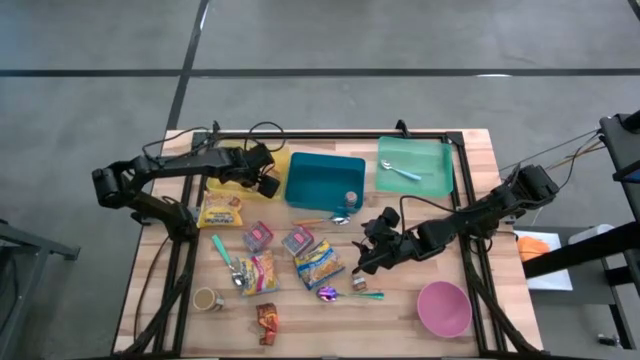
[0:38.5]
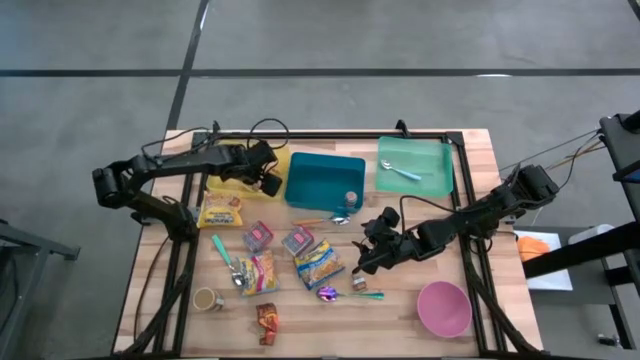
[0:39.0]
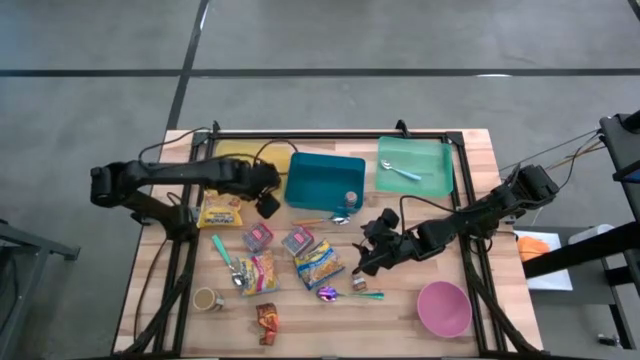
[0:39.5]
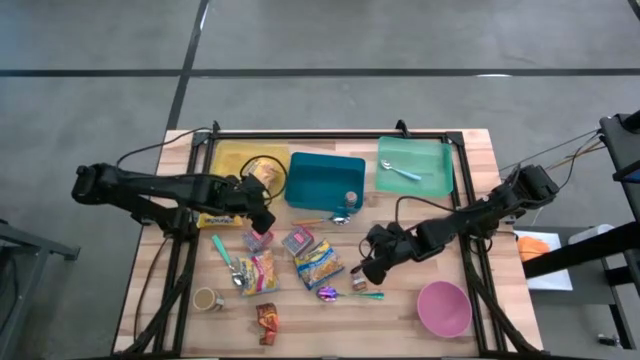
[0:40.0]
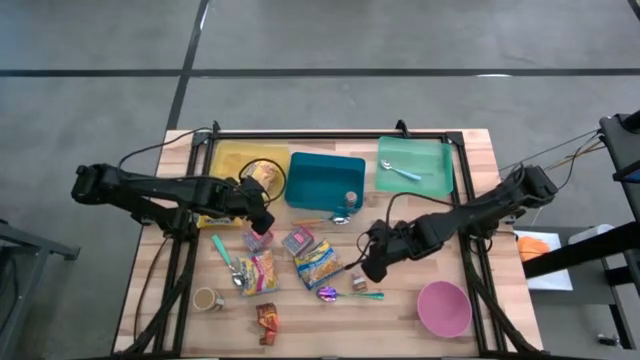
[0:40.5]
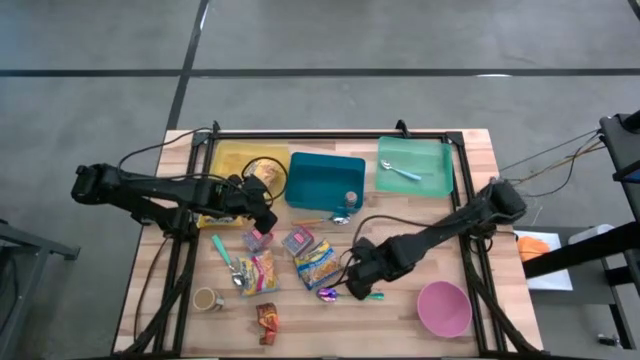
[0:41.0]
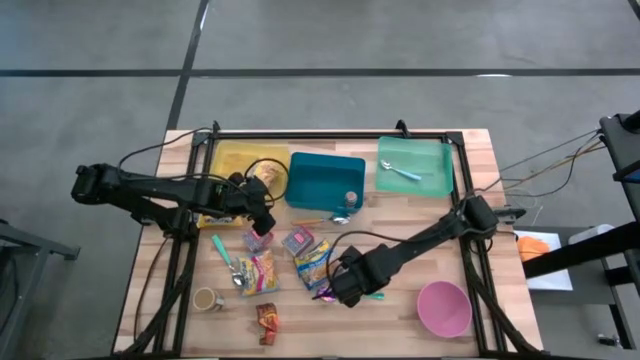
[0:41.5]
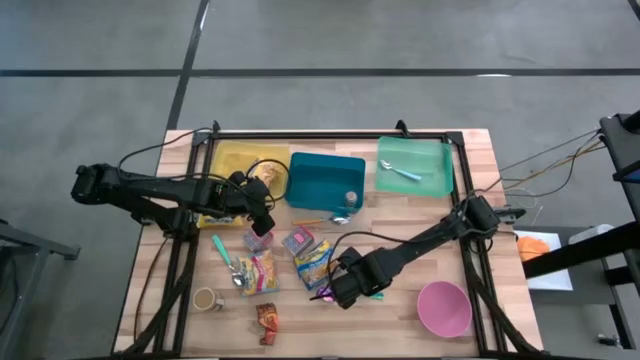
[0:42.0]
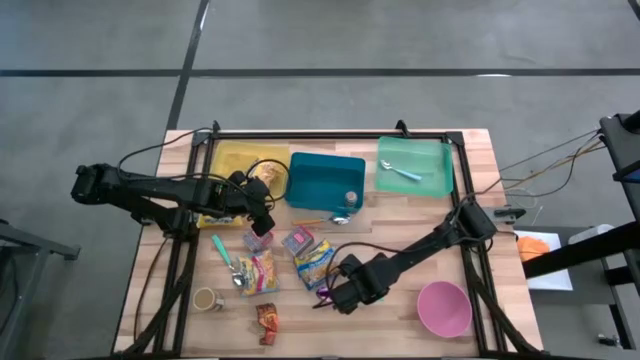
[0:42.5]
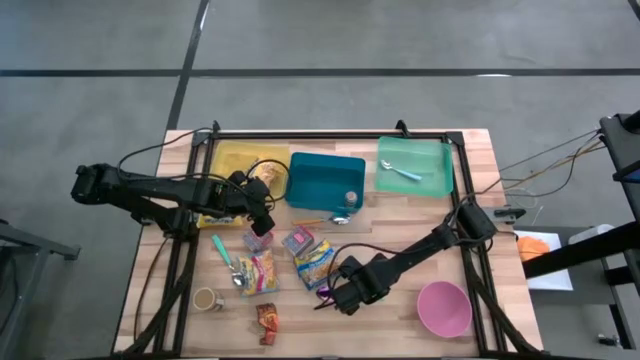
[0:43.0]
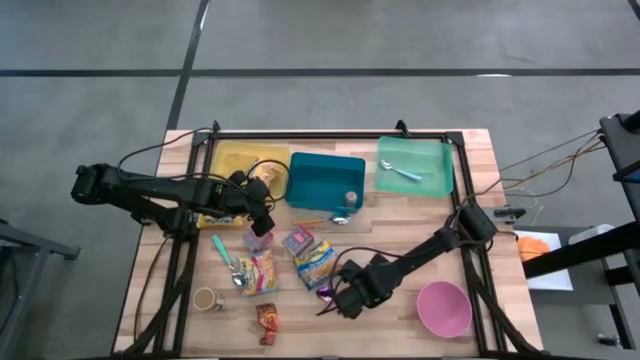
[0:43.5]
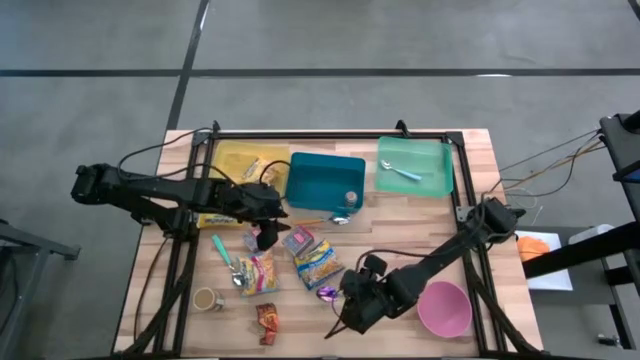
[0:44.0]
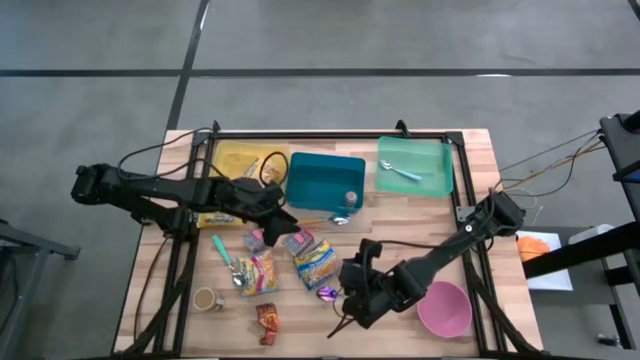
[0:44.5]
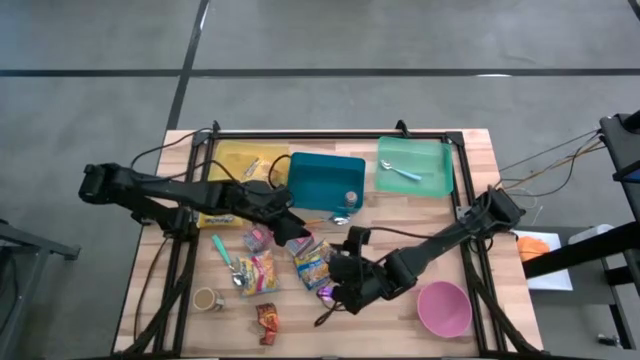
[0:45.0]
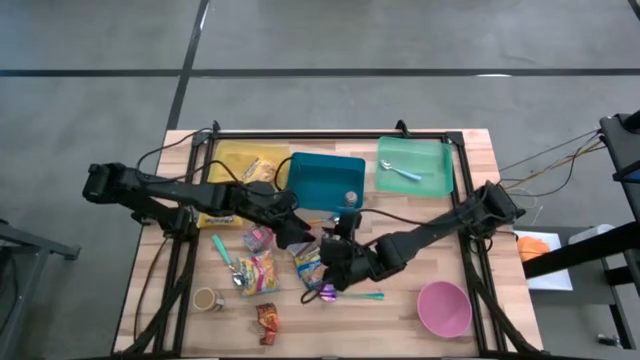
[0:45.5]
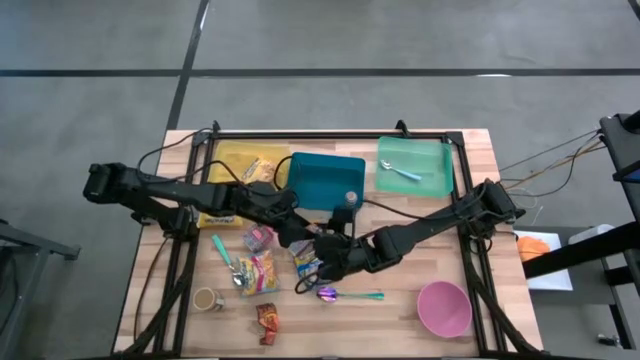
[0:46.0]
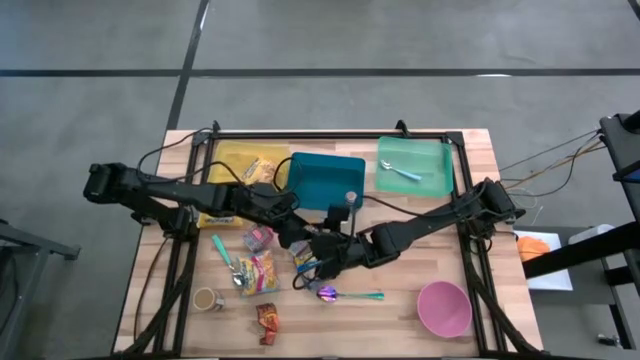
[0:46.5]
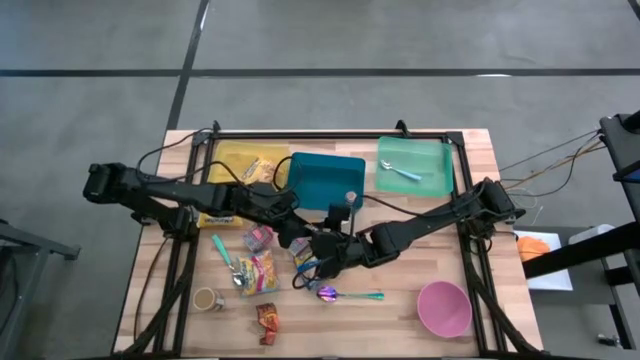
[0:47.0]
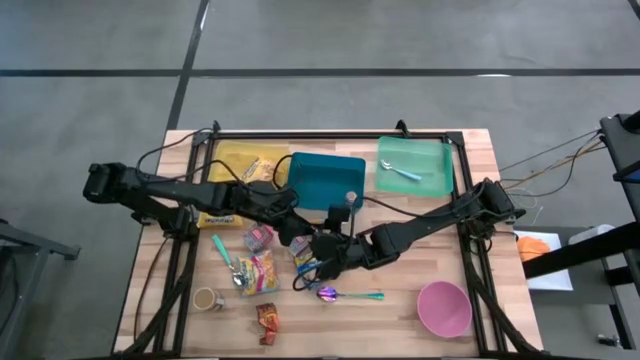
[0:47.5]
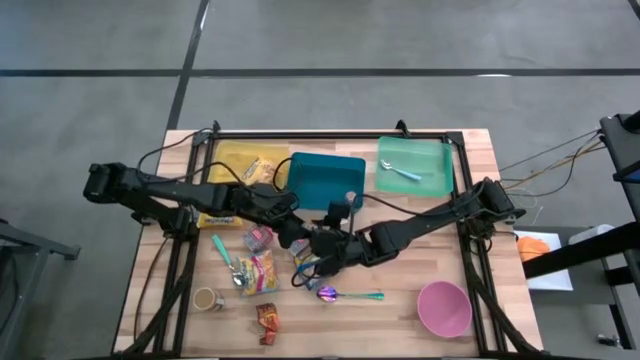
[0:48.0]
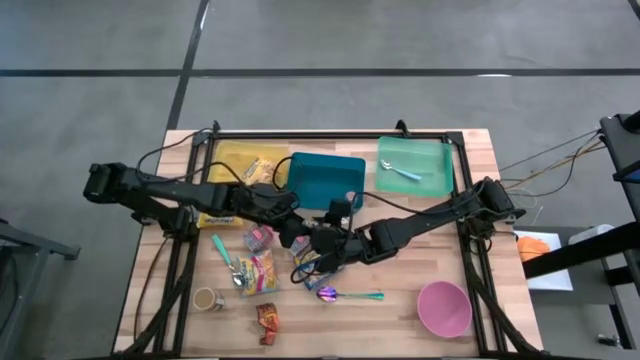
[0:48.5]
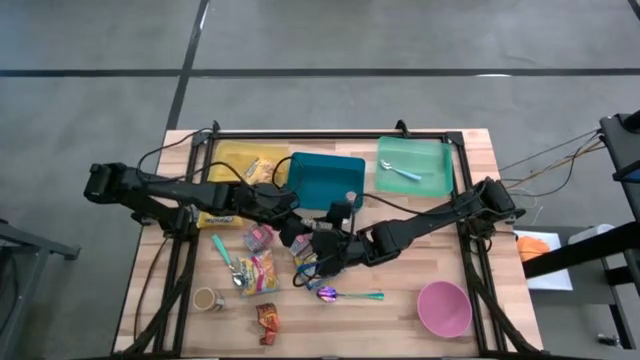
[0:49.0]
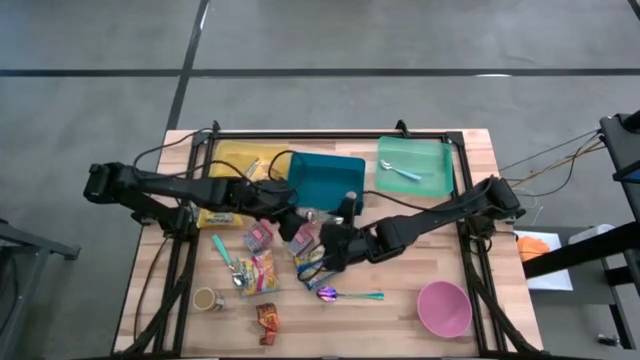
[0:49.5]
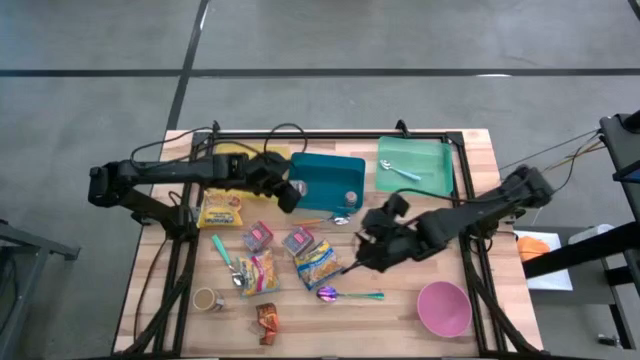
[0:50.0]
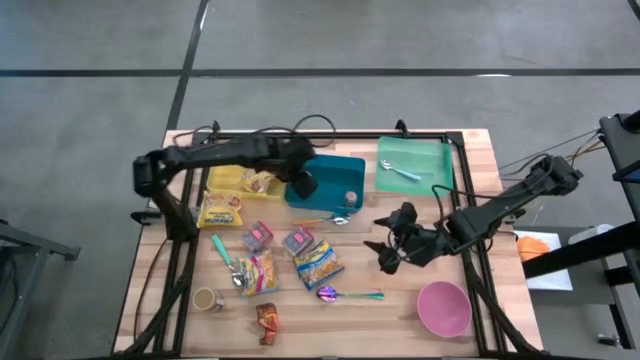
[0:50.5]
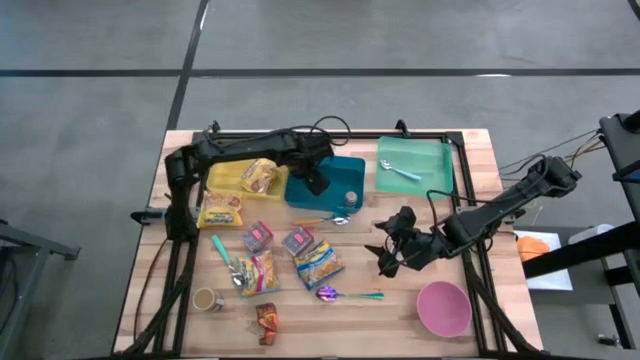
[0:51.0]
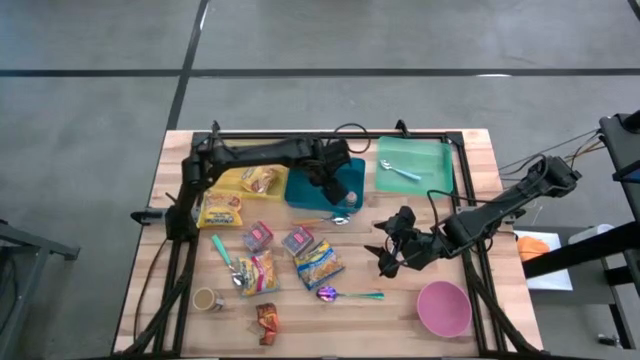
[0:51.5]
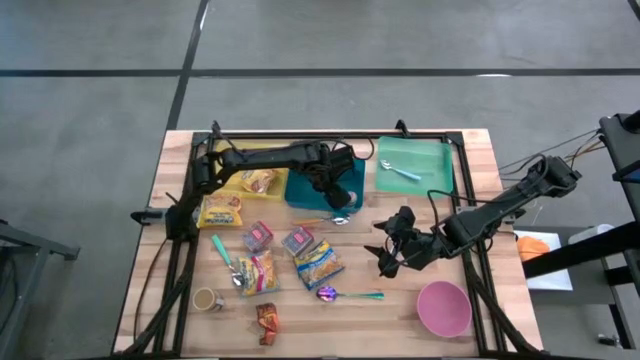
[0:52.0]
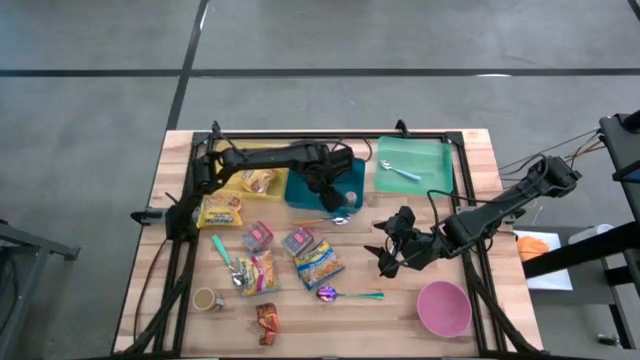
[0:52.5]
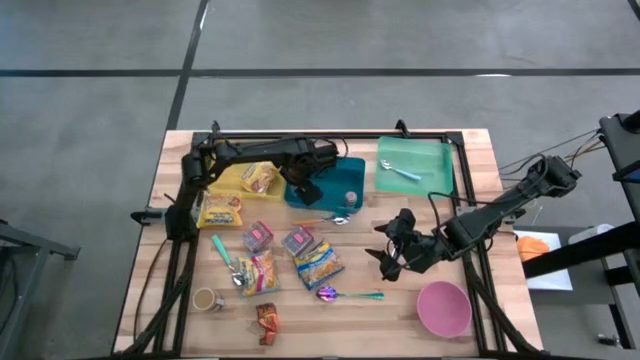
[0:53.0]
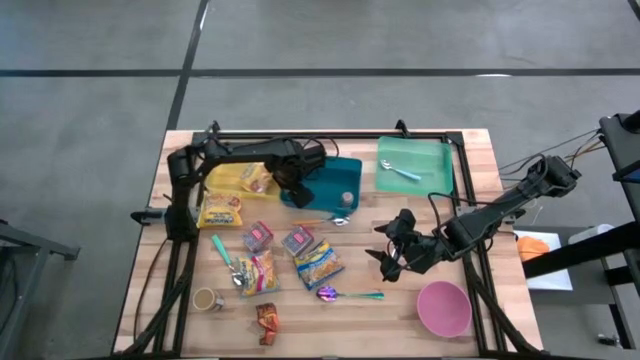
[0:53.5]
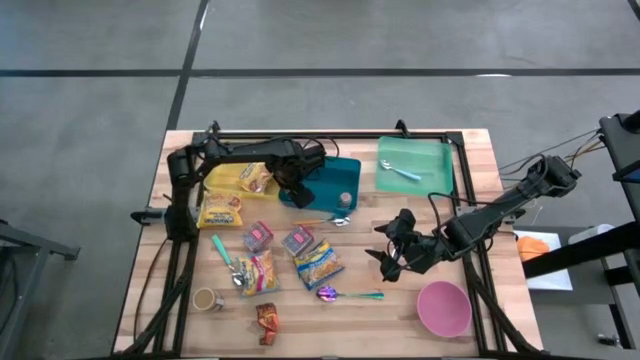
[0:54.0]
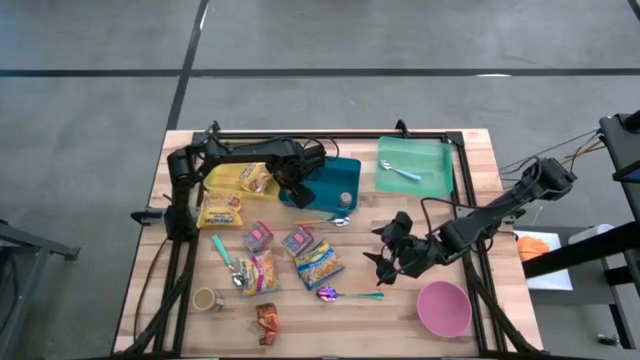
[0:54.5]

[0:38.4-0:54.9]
Put the brown seasoning bottle into the blue bin

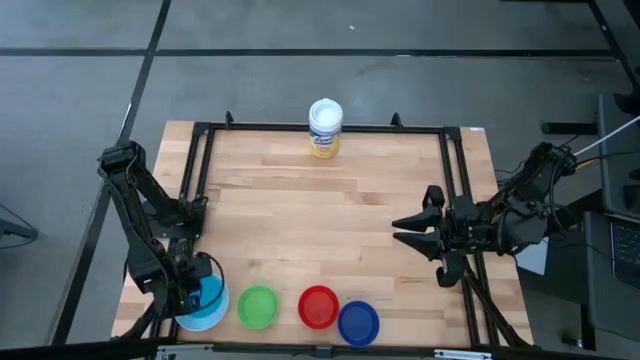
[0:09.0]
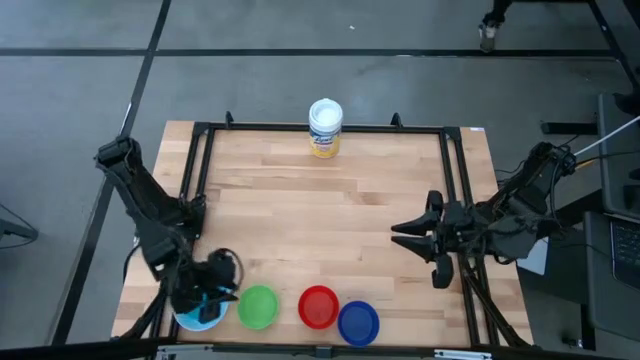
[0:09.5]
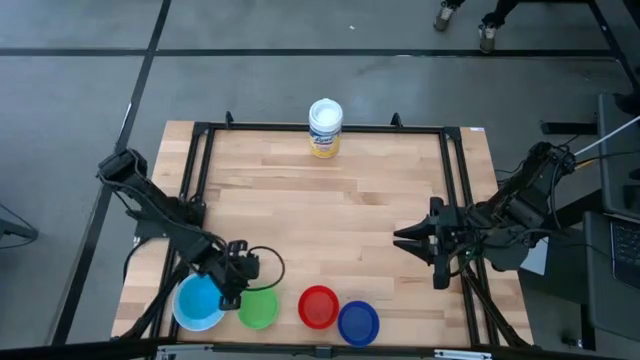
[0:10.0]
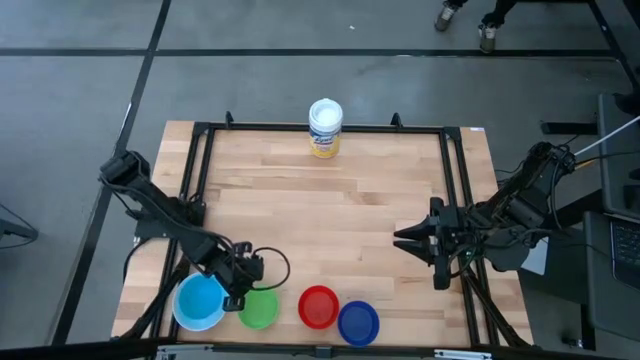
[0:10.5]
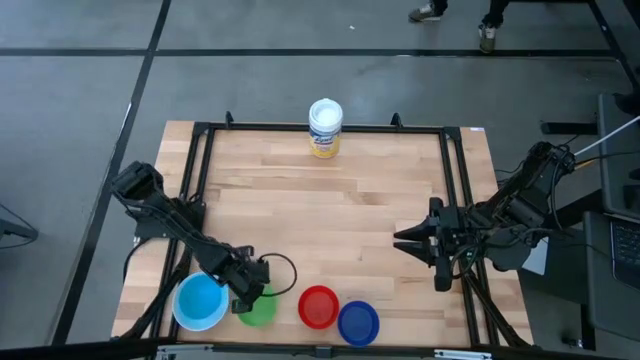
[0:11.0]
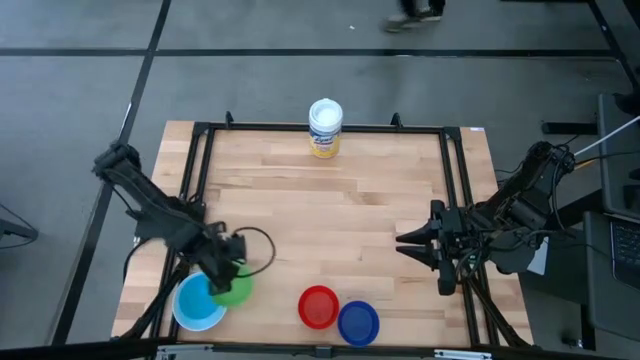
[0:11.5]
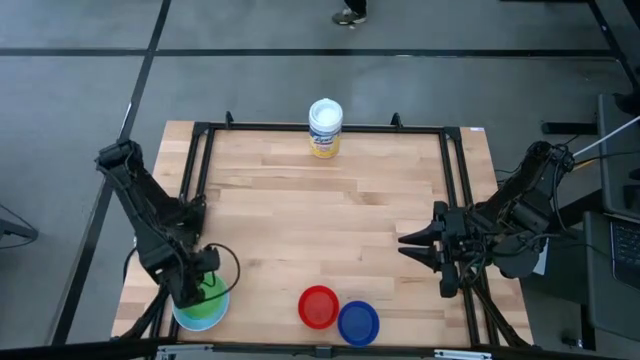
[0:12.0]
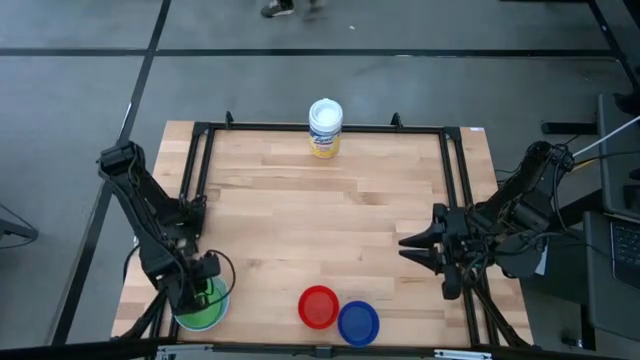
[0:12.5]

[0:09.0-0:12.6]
Stack the green bowl on top of the light blue bowl
